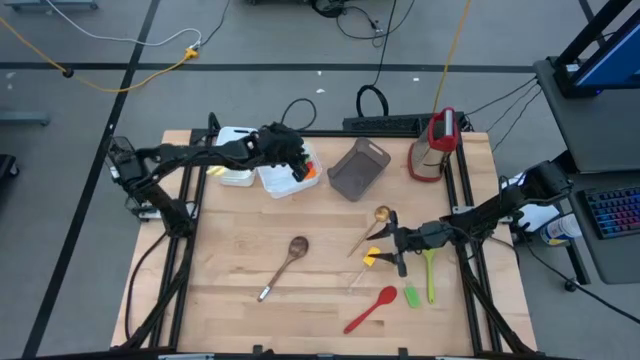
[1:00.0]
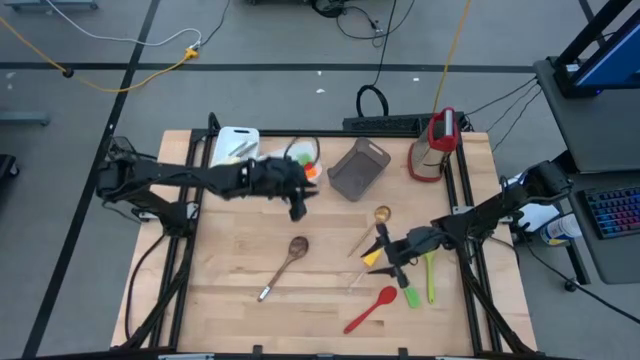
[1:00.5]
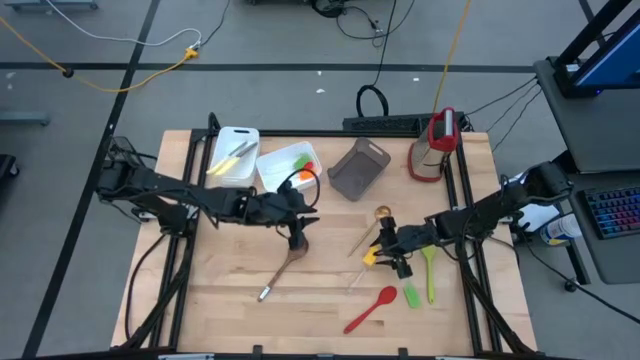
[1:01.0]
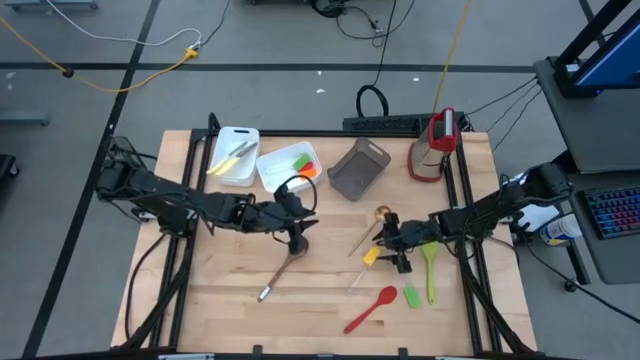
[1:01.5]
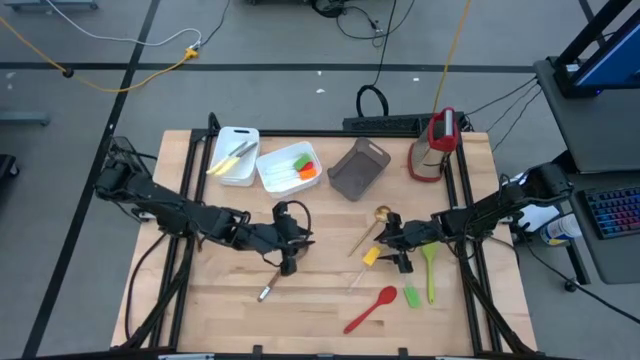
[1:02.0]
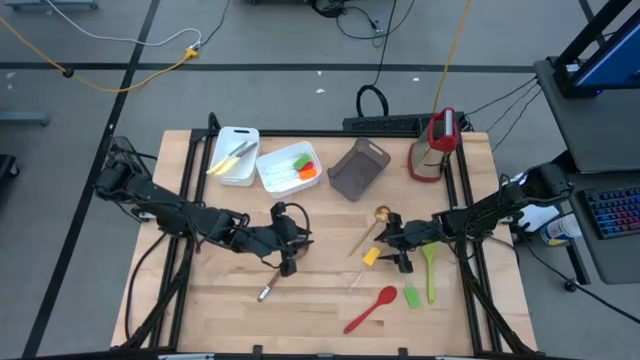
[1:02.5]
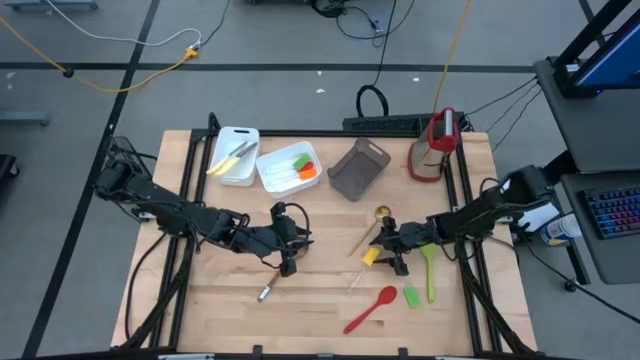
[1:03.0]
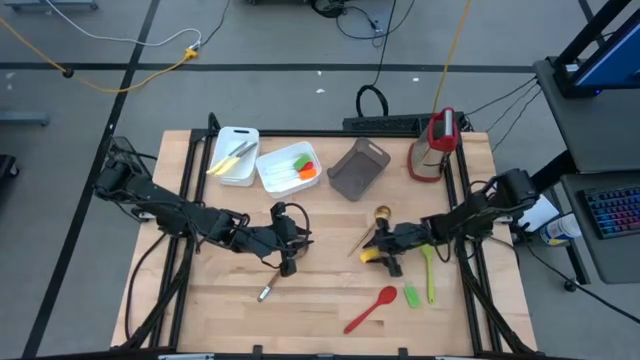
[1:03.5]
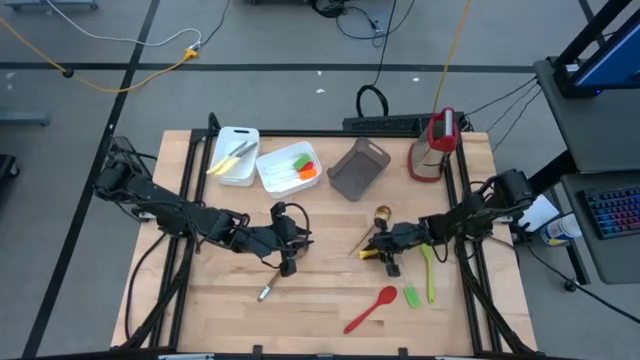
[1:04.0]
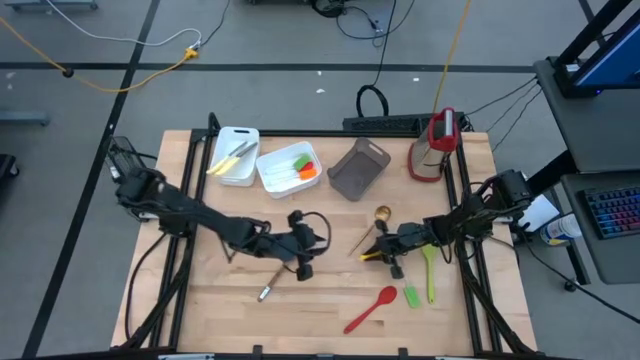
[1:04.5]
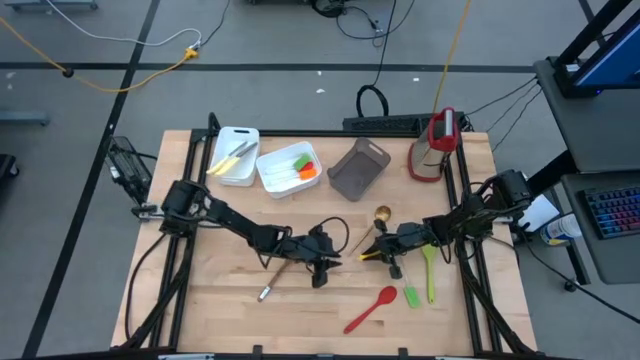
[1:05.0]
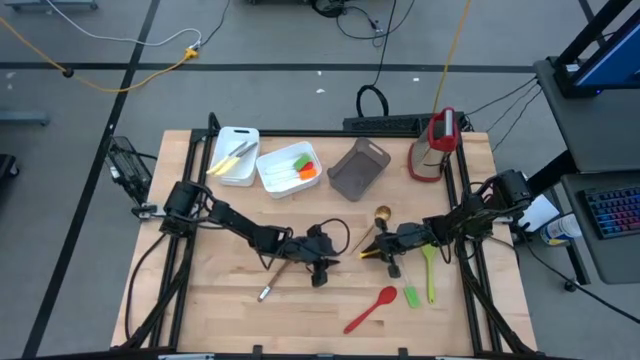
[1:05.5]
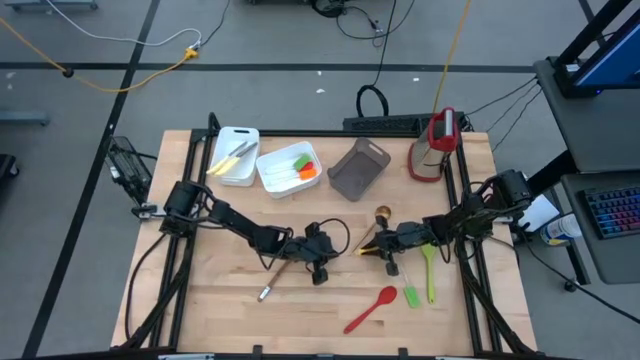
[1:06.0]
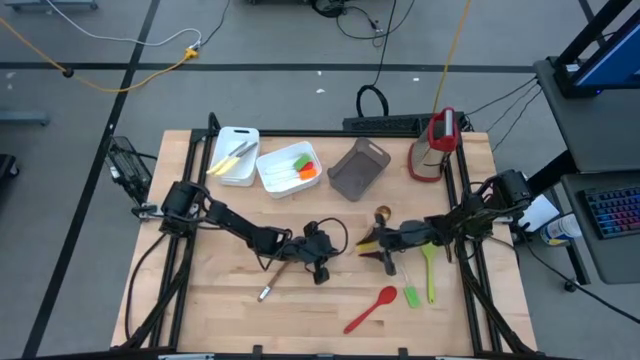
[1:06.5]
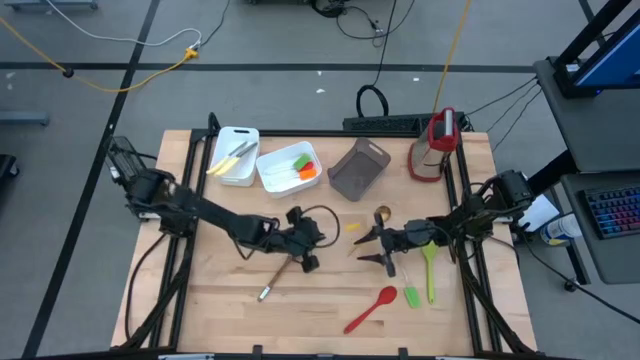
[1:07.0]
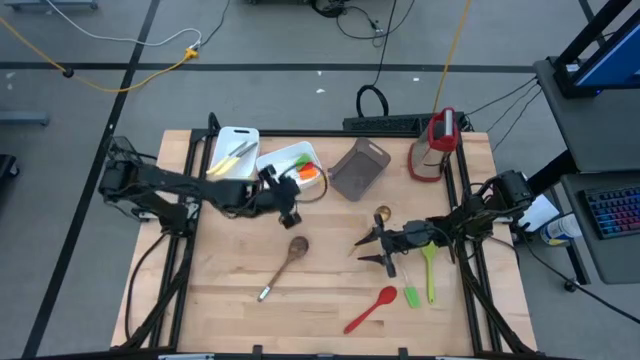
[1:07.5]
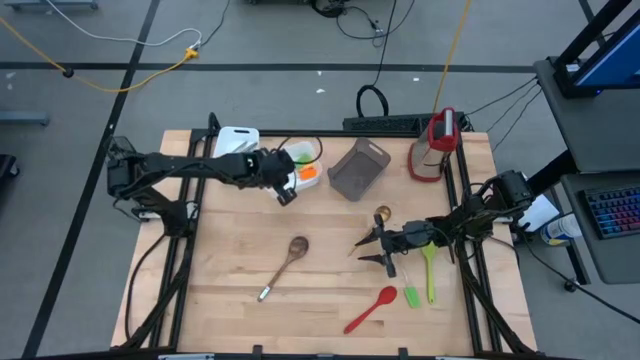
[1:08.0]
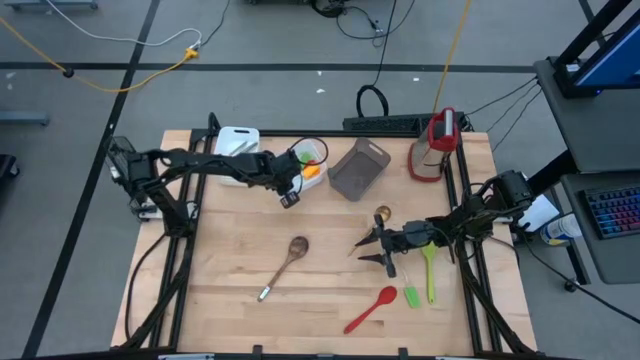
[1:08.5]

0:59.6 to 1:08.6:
Task: Pick & Place Kitchen Items
Put the yellow spatula into the right white bin

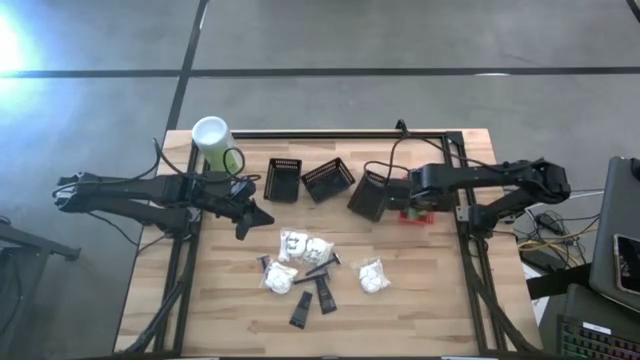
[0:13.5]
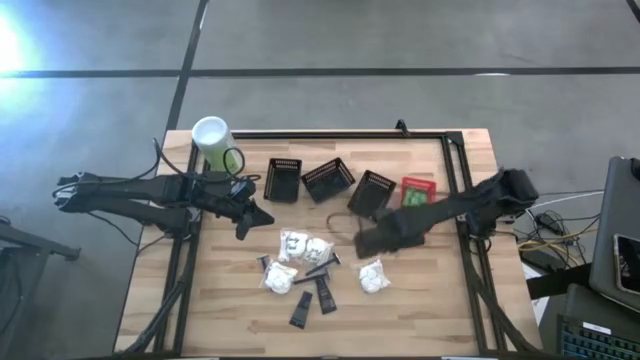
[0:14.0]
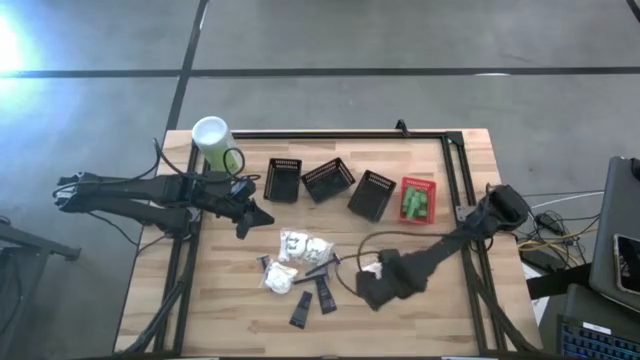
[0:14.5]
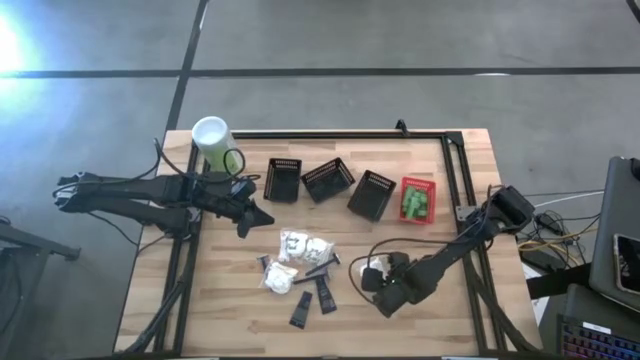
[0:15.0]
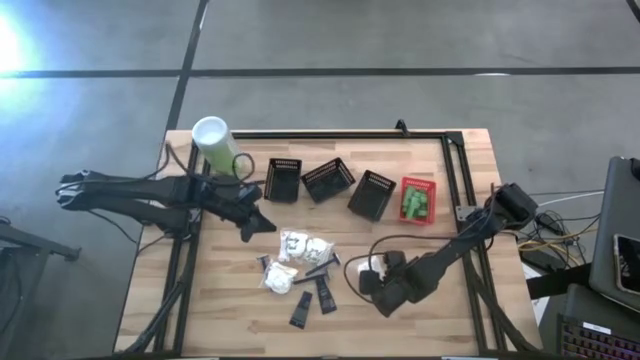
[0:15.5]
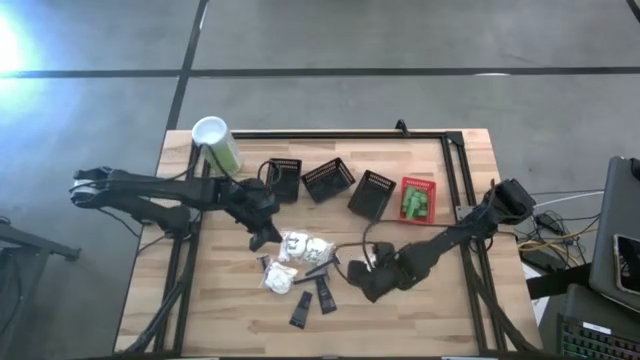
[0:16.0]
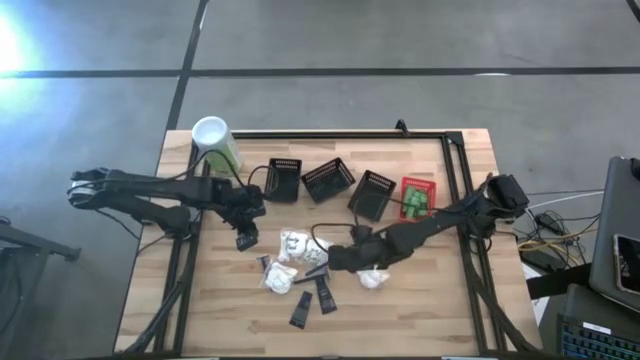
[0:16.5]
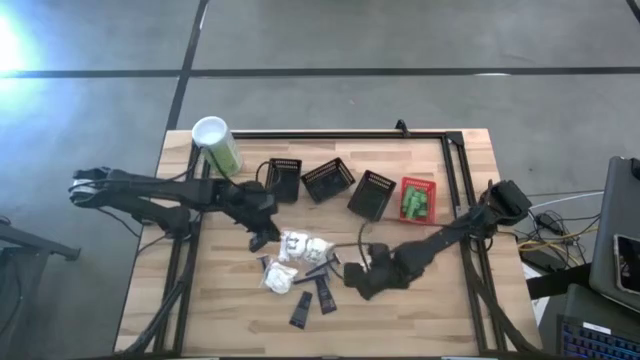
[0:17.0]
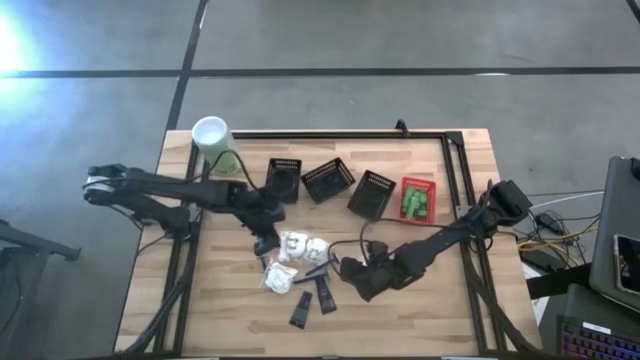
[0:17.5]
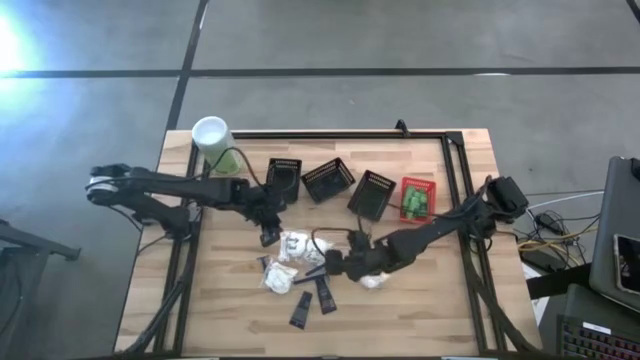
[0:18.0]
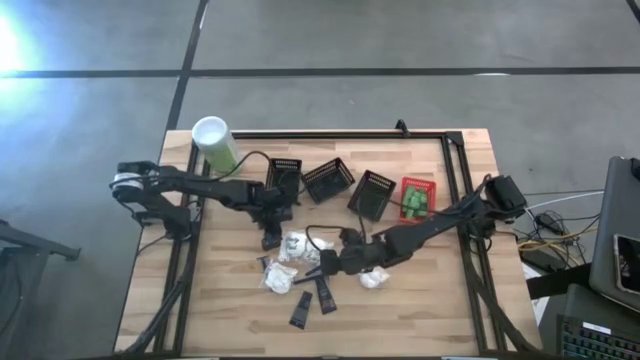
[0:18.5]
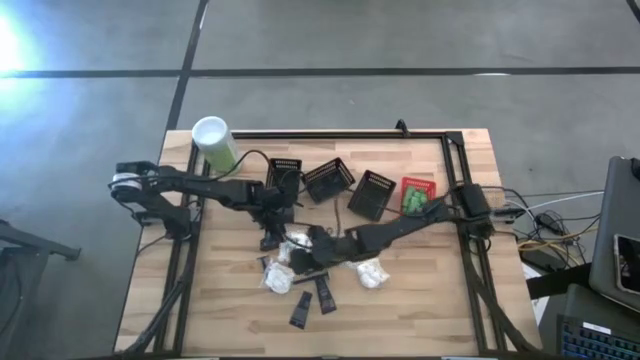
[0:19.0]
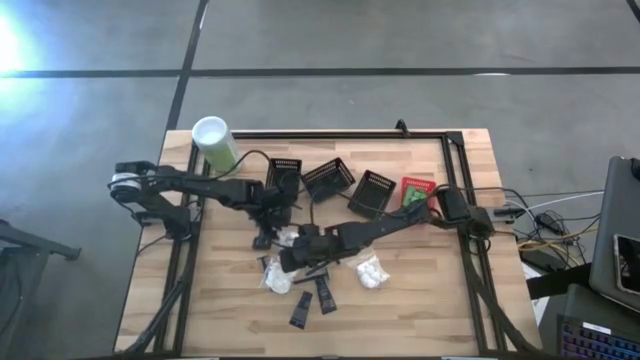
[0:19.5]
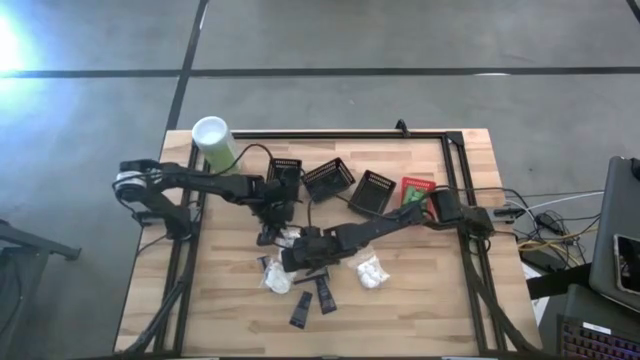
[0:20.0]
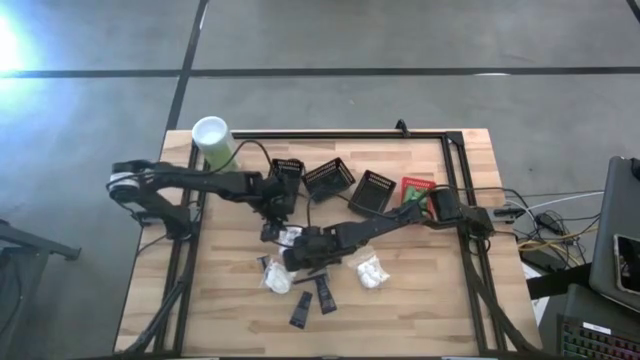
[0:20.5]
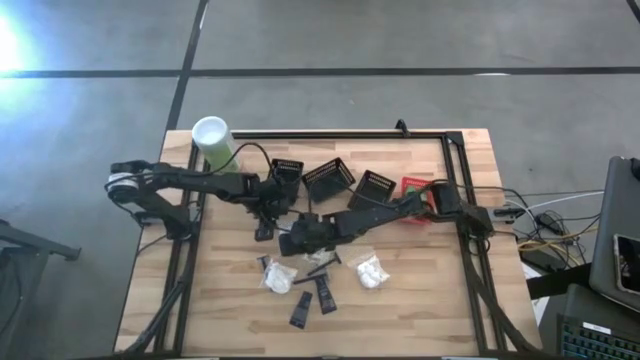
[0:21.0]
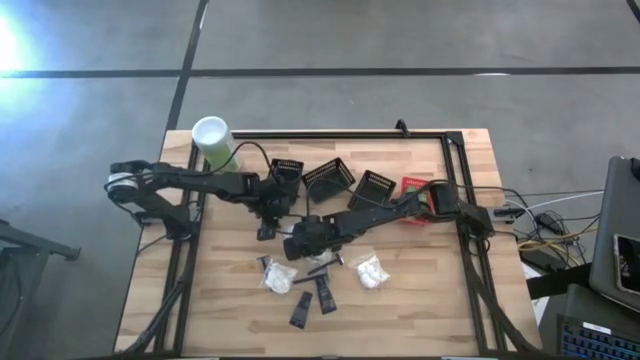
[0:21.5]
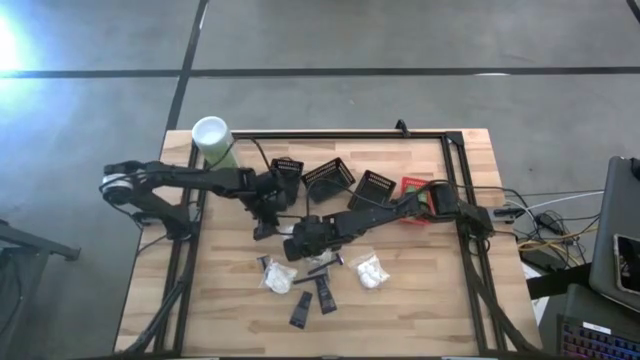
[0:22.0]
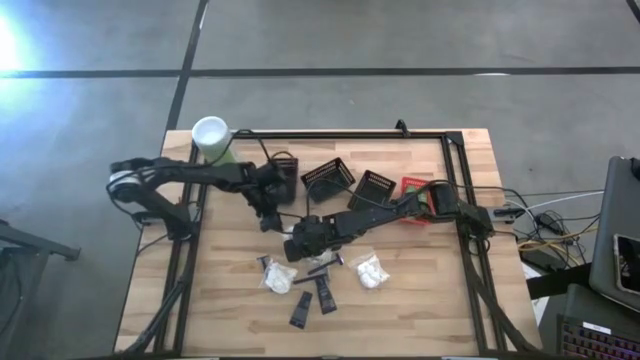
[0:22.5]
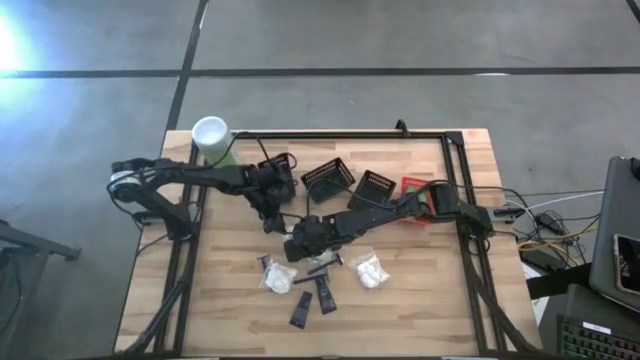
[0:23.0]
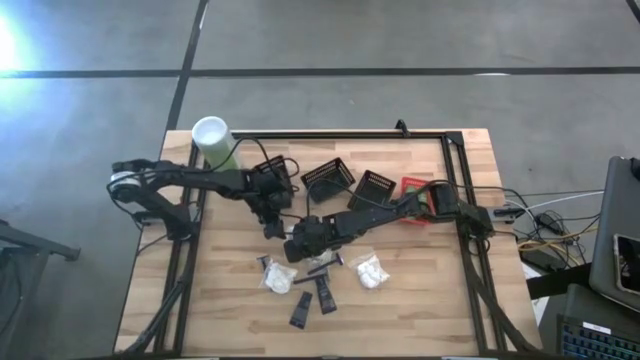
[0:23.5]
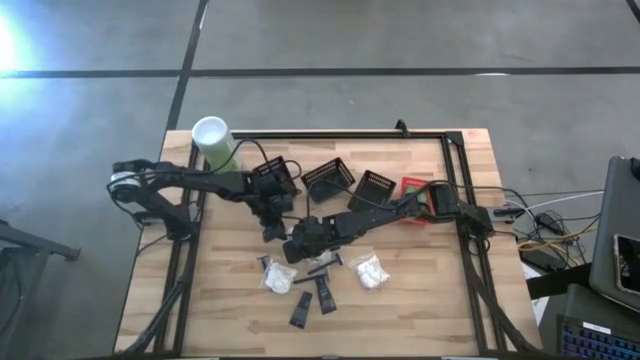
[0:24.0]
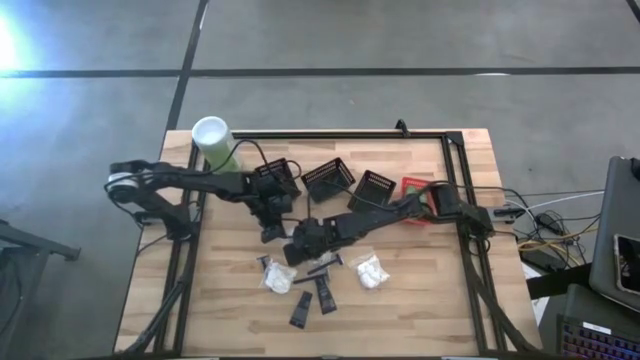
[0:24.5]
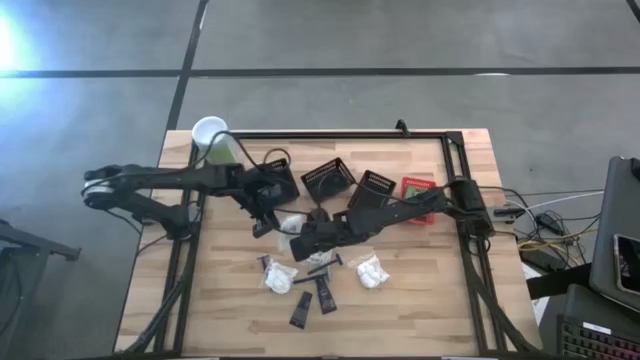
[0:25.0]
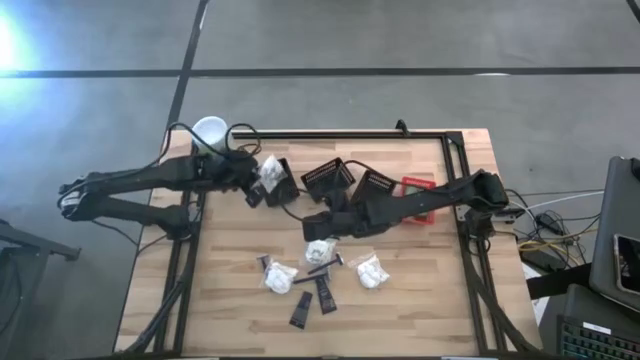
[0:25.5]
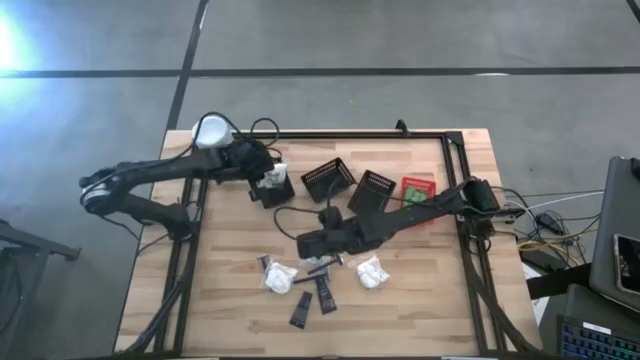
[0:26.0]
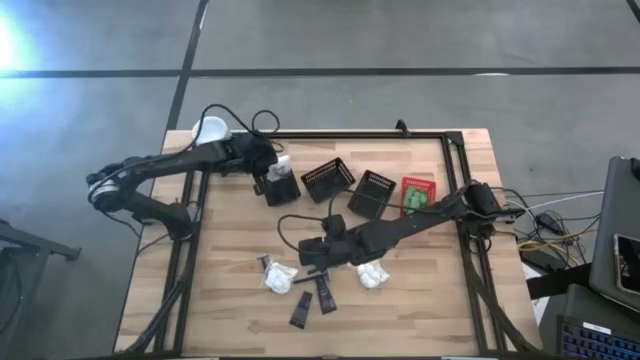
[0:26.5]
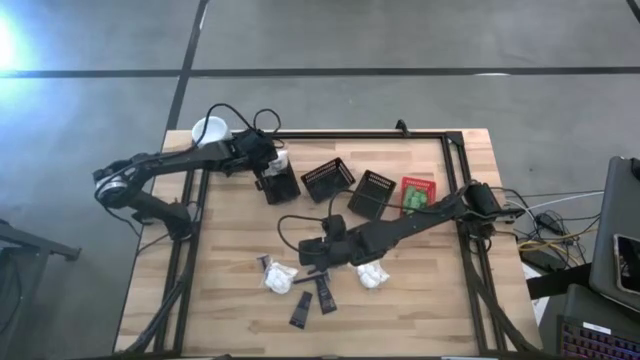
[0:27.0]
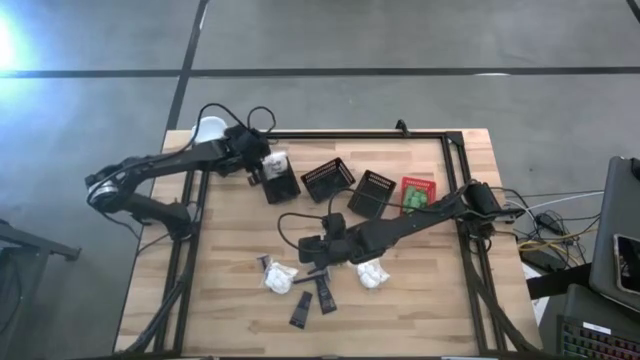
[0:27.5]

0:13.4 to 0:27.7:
Task: Pick & Place Travel size toiletries
Put the cotton pack into the left black bin
